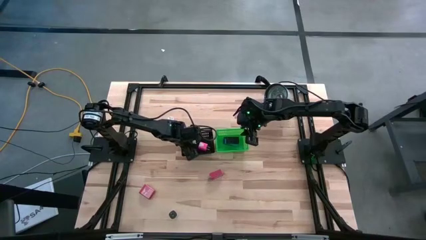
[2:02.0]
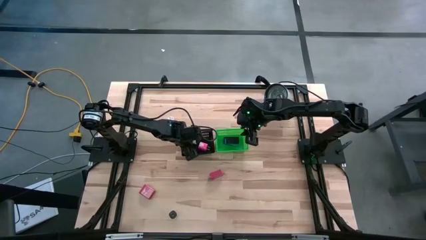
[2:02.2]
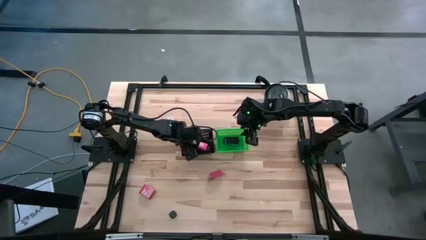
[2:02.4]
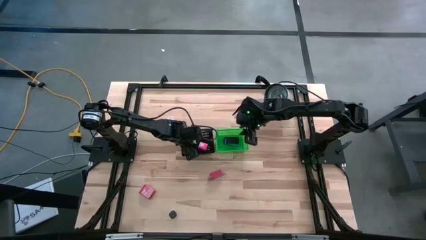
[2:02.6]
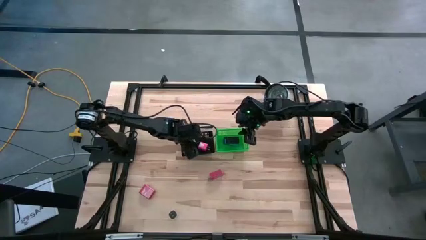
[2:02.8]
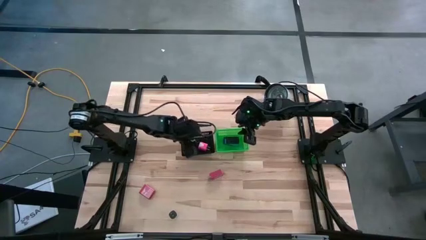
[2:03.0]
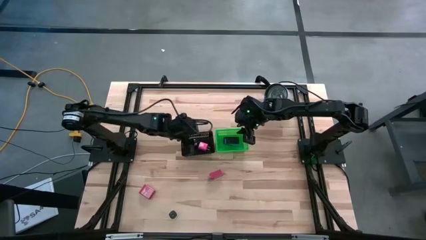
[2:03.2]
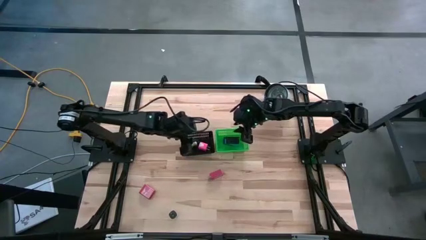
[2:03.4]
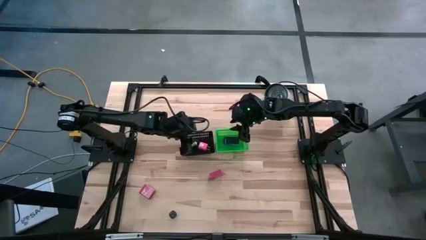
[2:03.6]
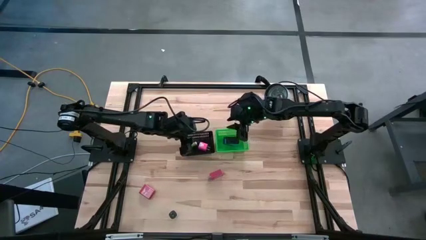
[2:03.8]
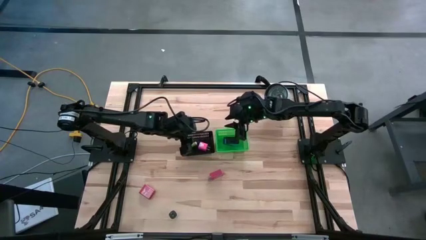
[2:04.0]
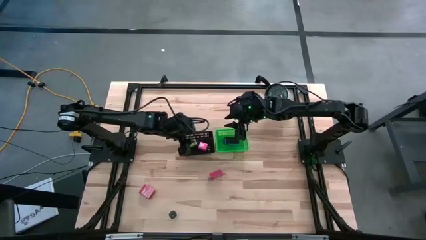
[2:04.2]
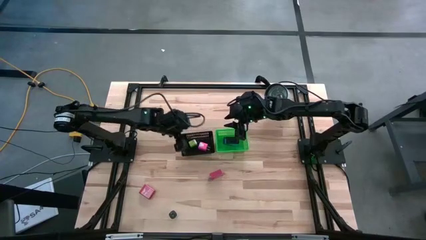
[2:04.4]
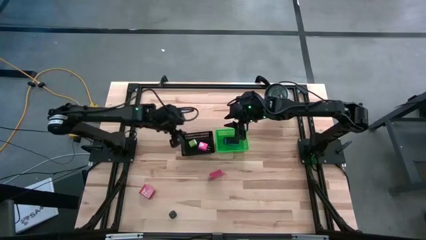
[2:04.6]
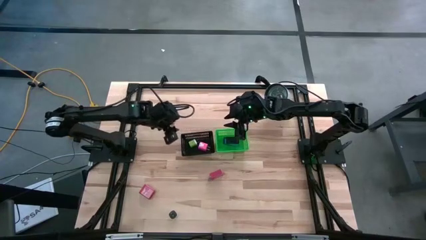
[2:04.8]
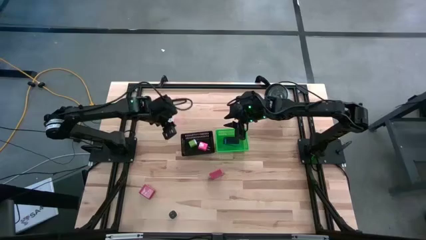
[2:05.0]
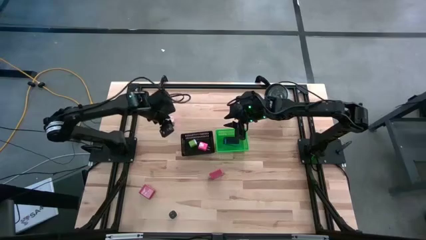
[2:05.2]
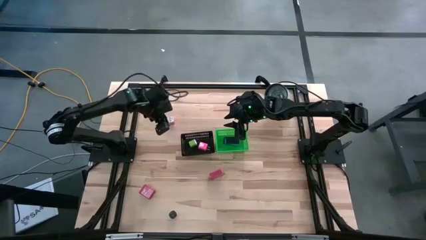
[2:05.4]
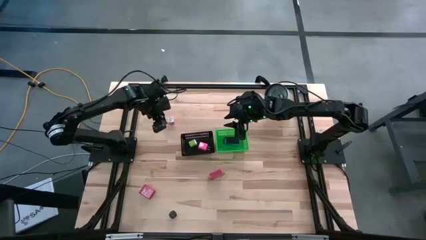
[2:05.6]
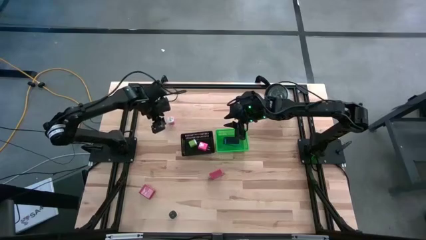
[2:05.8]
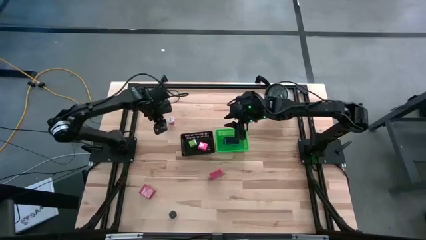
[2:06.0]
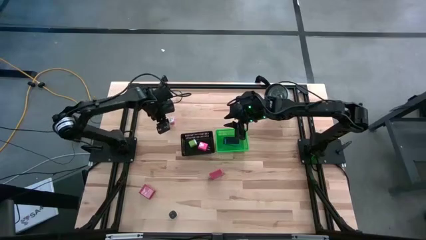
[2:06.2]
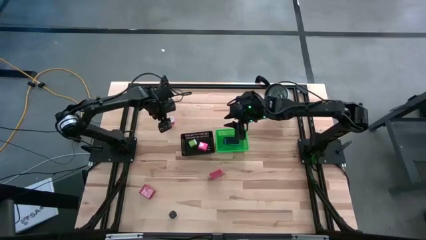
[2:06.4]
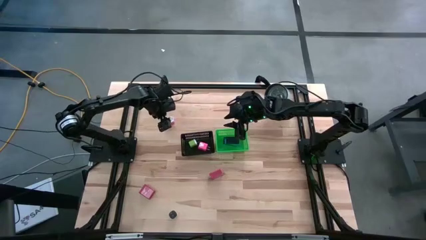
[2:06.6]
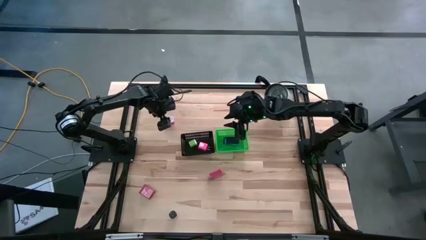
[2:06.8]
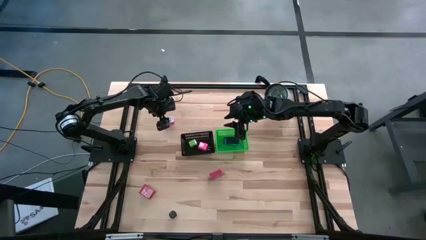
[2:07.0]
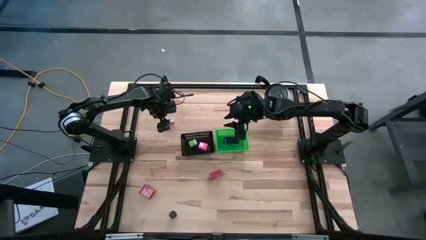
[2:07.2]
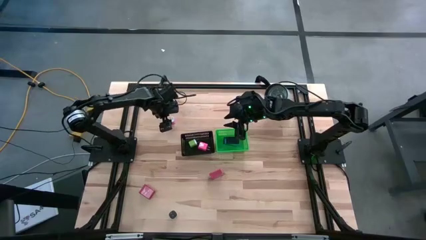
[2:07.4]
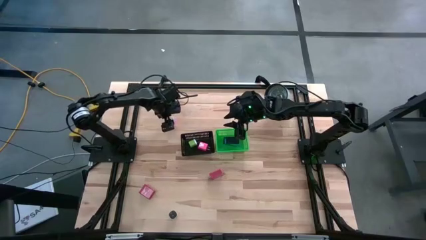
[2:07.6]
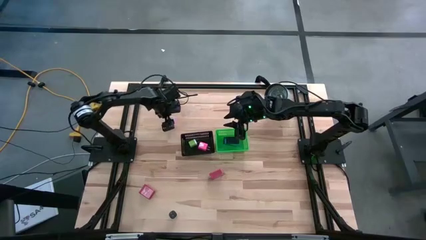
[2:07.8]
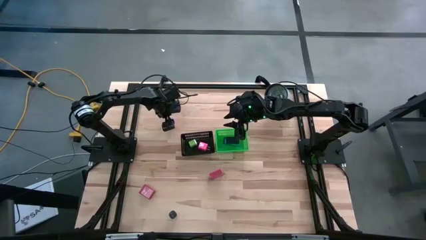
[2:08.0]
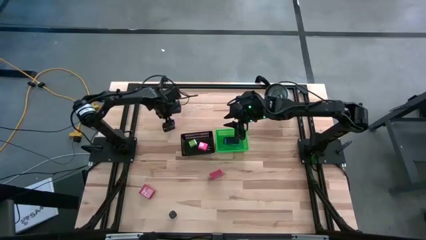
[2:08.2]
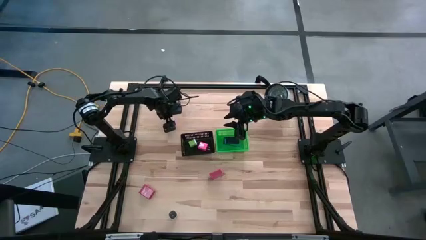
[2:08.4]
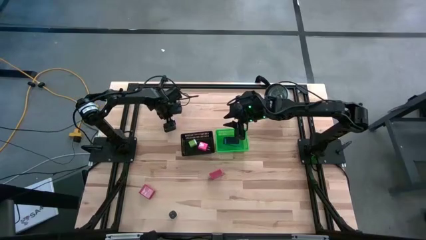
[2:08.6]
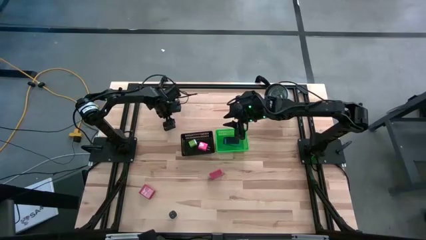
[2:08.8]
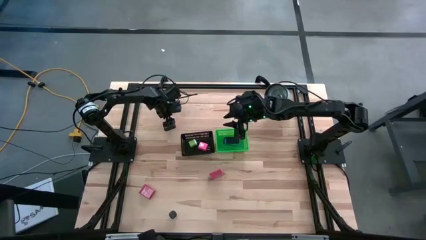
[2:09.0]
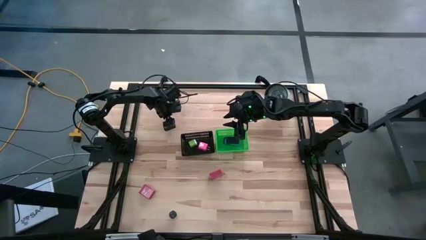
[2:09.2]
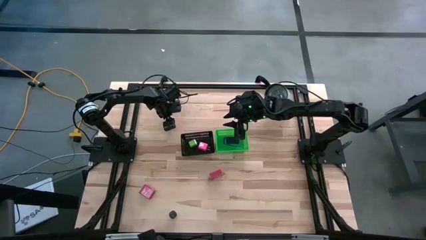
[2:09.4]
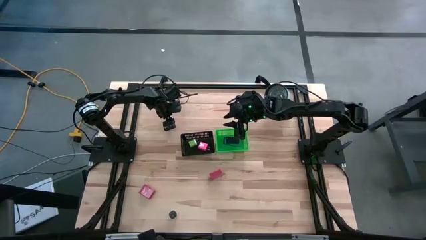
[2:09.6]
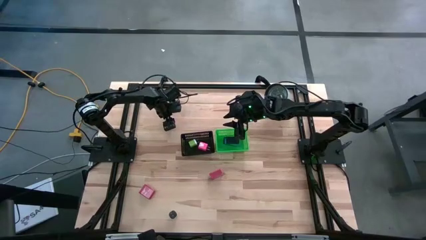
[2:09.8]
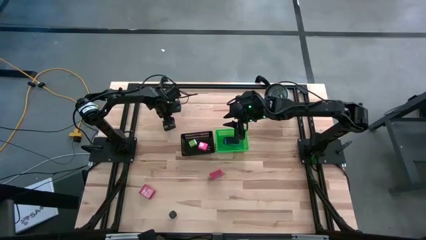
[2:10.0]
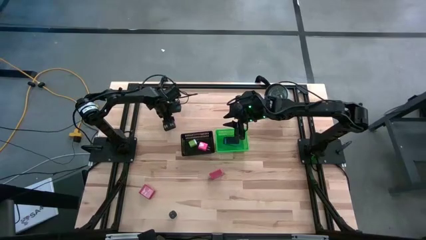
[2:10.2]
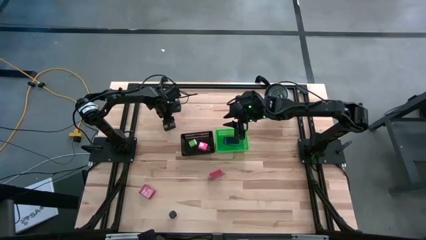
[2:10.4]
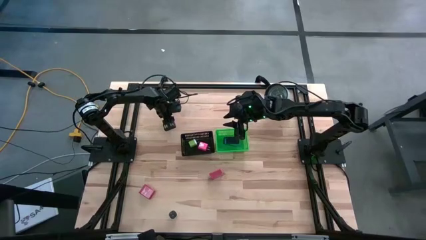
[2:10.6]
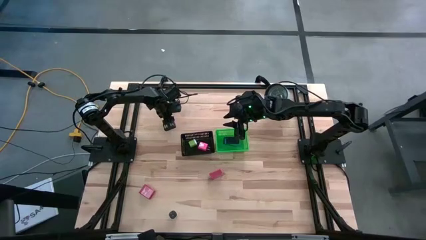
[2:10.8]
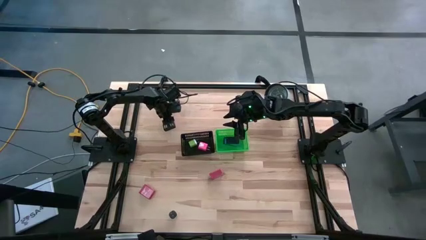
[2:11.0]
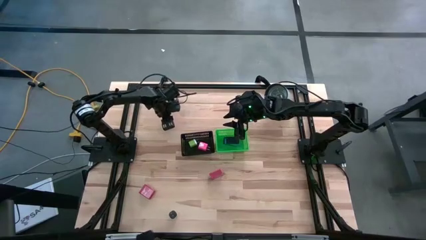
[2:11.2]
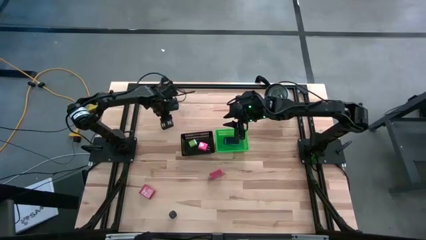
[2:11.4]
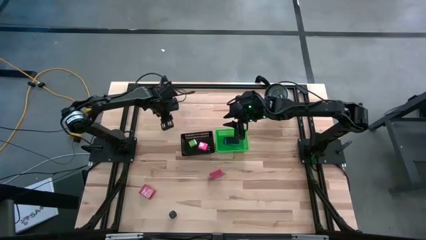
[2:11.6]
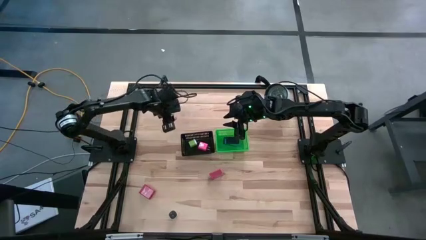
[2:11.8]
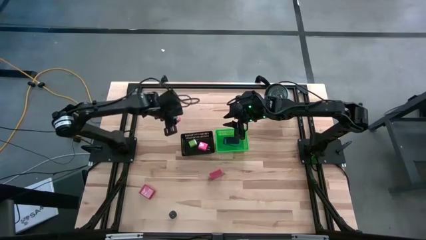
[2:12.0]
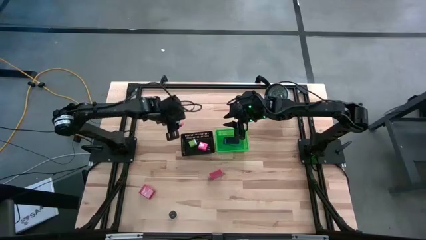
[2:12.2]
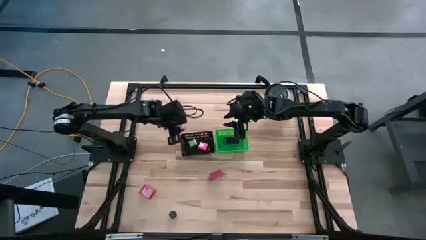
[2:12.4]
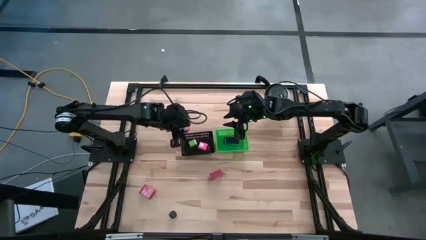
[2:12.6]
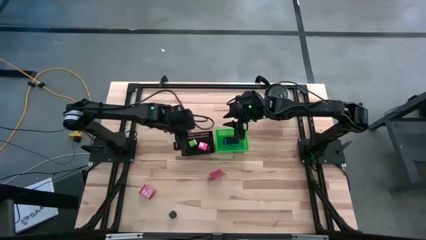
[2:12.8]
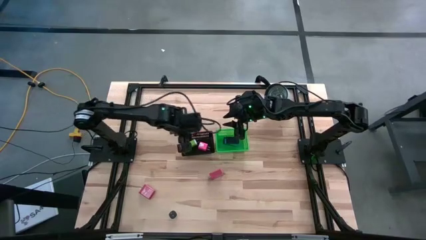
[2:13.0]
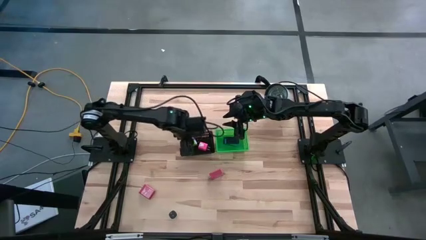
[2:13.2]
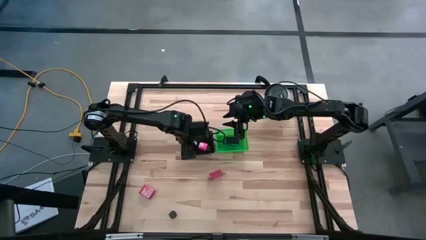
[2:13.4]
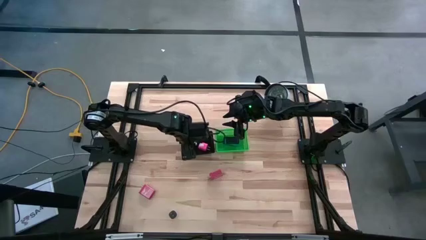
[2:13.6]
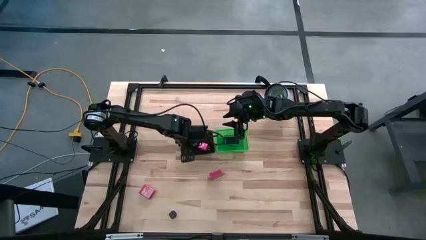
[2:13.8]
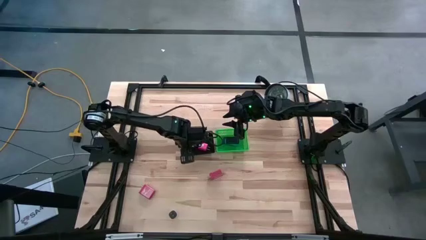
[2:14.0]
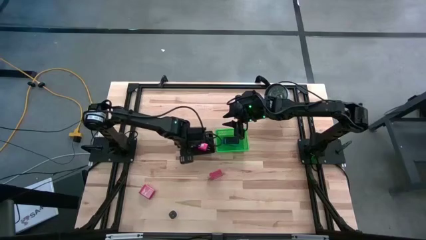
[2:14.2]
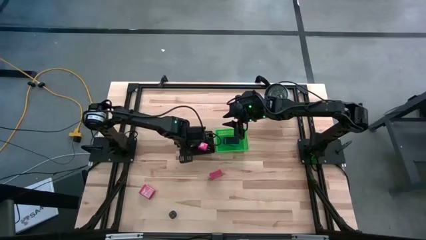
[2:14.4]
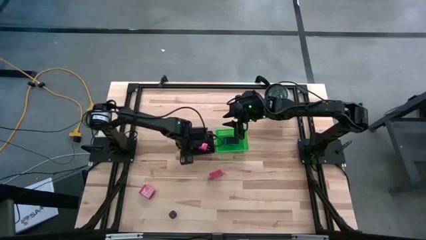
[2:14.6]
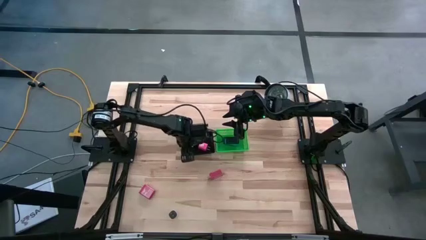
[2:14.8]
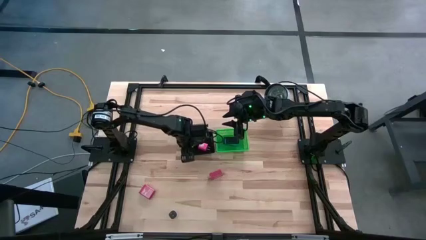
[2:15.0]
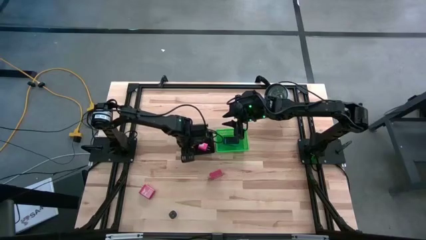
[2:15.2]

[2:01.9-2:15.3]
Task: Pick & Place Office items
Put the pink charger adapter into the black bin

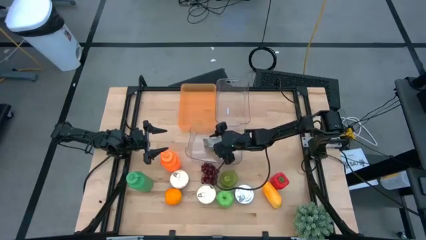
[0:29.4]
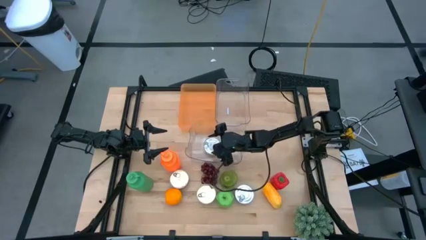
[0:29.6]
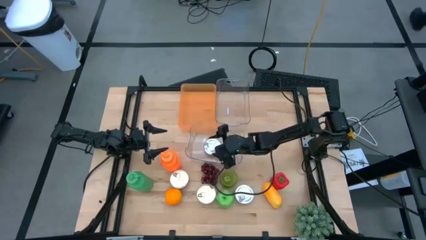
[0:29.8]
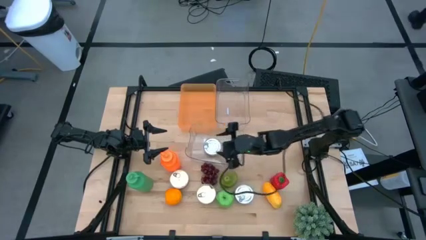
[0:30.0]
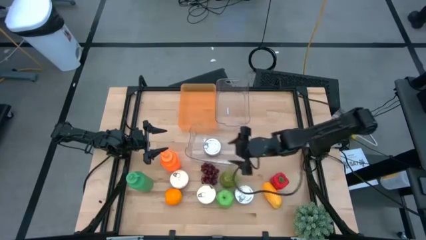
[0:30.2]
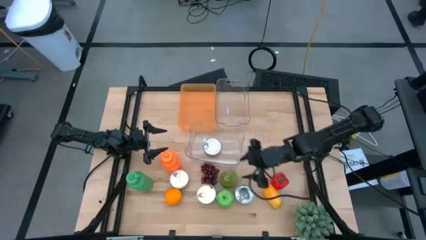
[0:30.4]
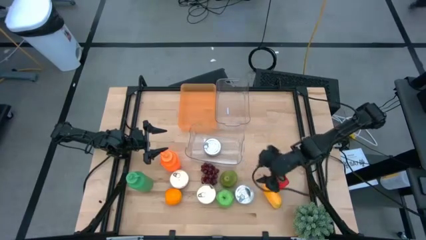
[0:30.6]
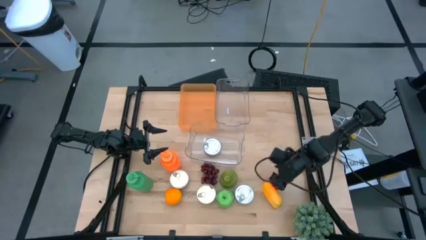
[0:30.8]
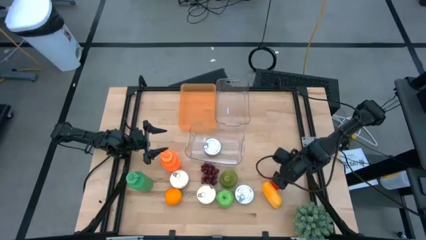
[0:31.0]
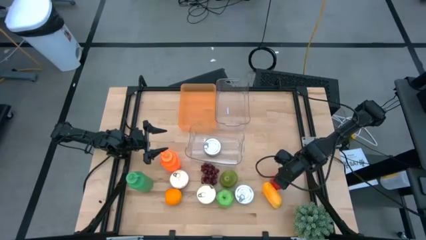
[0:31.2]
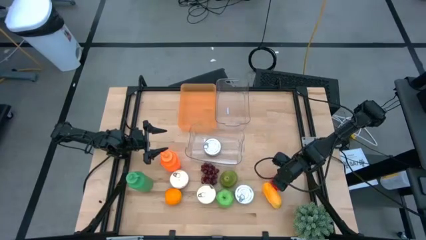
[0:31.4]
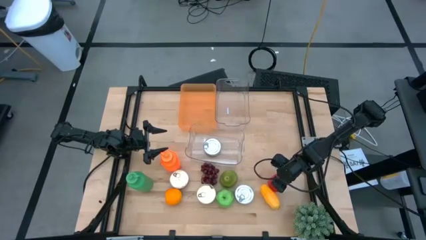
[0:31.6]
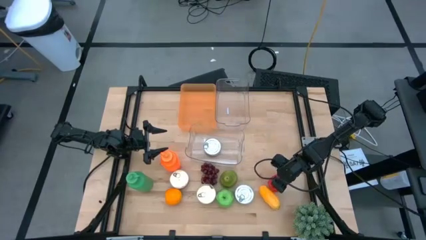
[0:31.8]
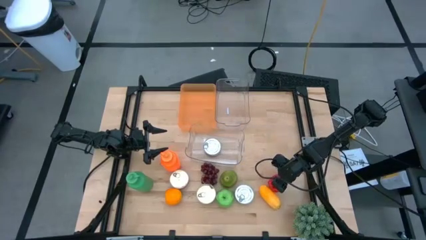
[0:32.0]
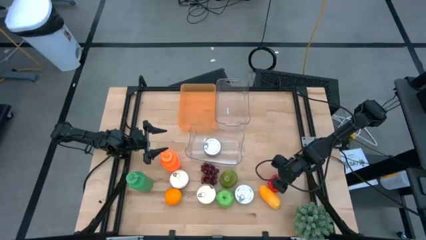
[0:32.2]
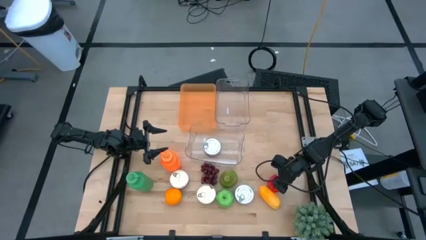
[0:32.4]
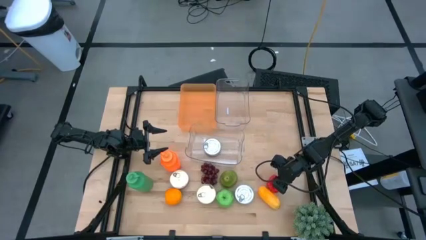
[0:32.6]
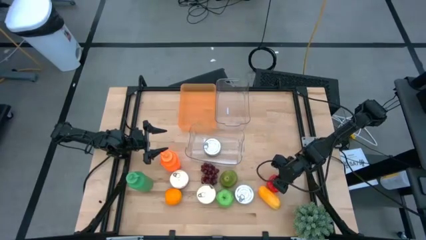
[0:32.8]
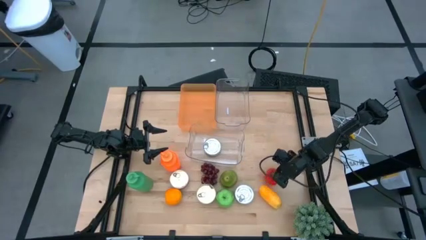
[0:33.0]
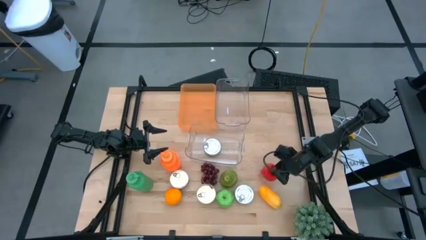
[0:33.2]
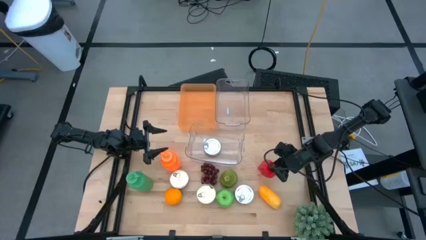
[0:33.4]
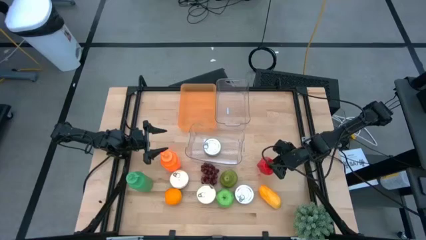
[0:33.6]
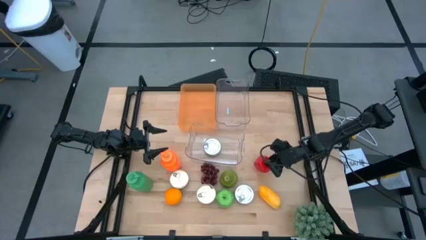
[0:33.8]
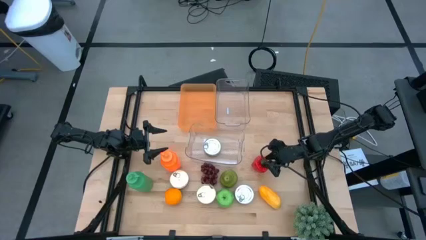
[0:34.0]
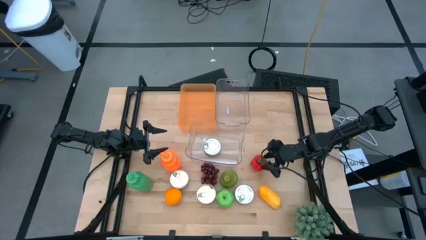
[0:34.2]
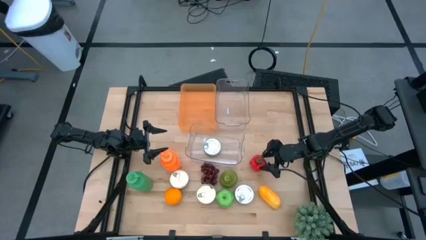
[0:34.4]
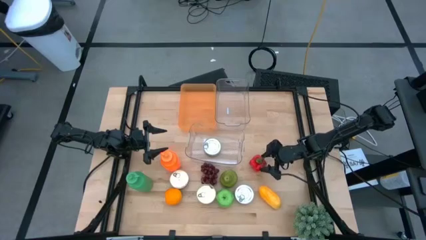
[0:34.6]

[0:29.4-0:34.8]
Task: Pick & Place Food Item
Put the bell pepper into the top transparent bin
